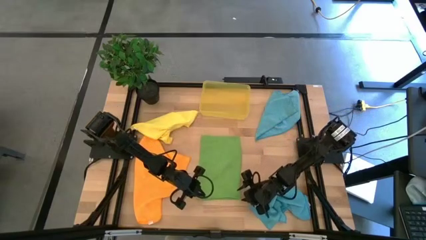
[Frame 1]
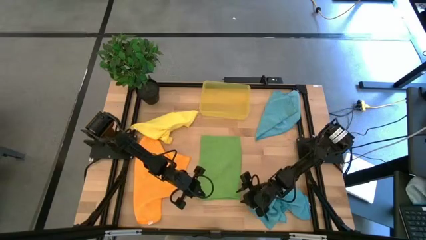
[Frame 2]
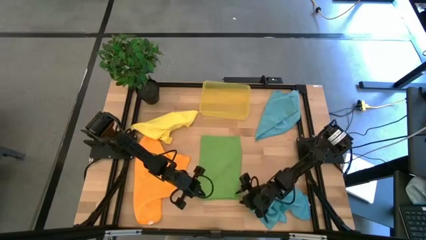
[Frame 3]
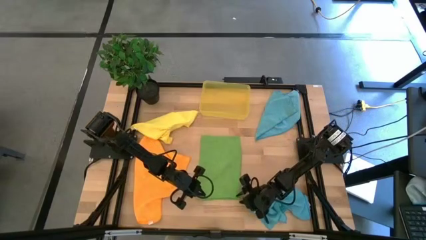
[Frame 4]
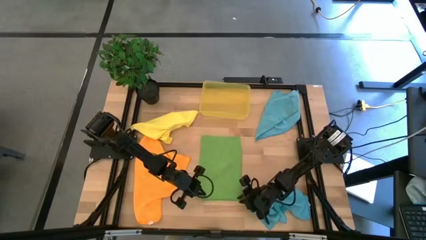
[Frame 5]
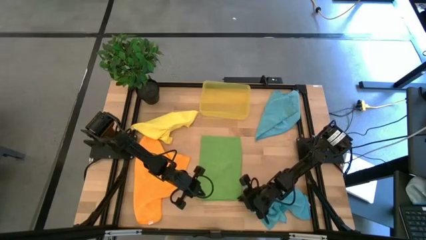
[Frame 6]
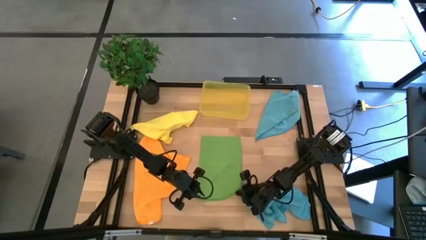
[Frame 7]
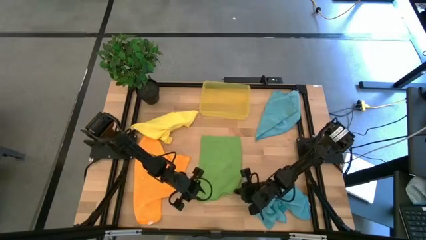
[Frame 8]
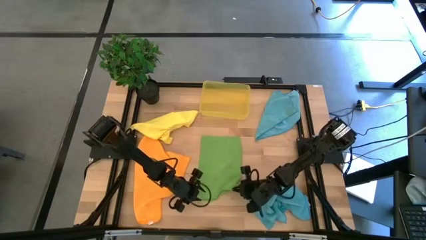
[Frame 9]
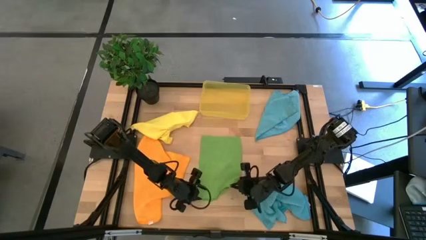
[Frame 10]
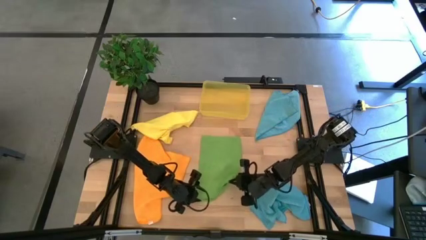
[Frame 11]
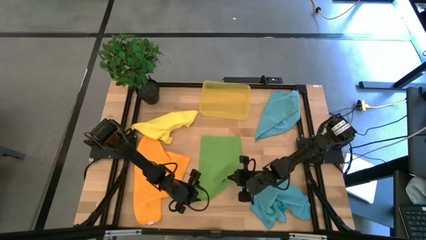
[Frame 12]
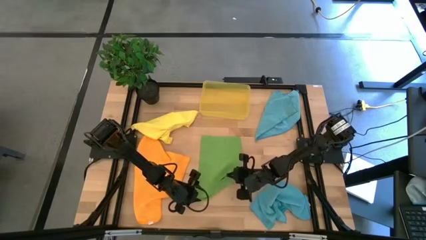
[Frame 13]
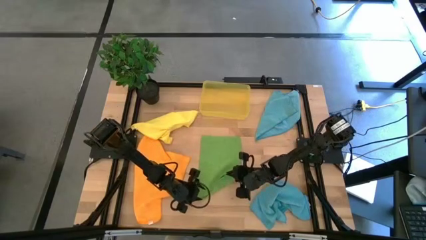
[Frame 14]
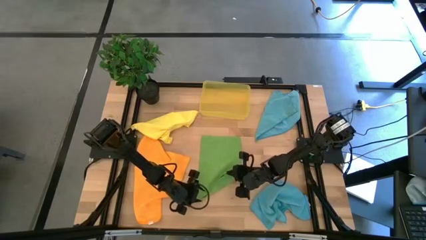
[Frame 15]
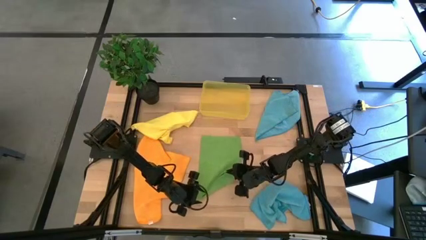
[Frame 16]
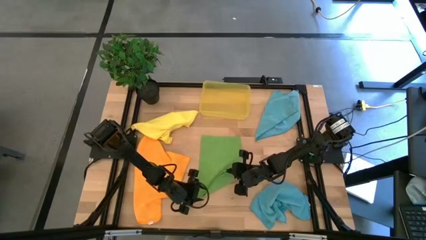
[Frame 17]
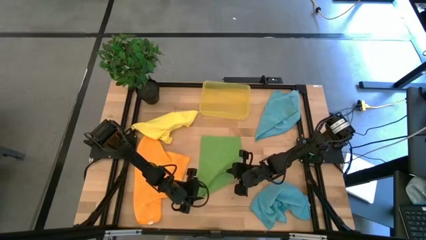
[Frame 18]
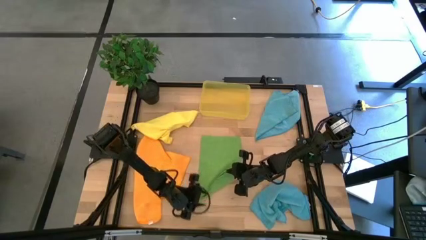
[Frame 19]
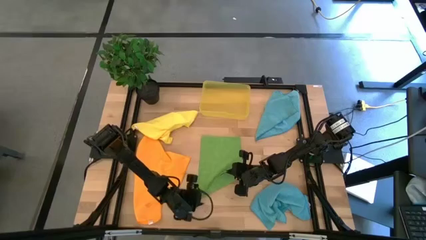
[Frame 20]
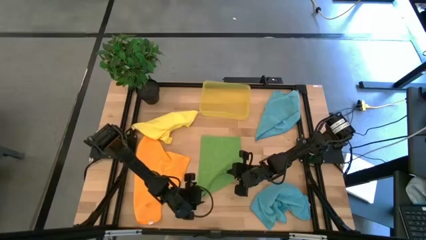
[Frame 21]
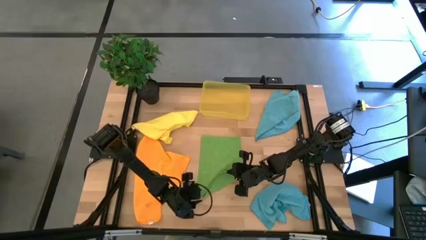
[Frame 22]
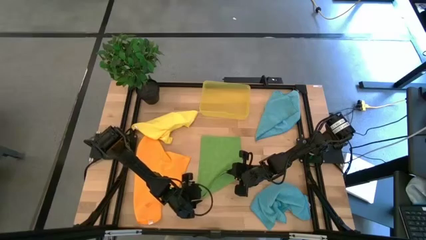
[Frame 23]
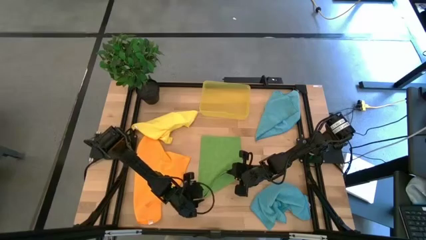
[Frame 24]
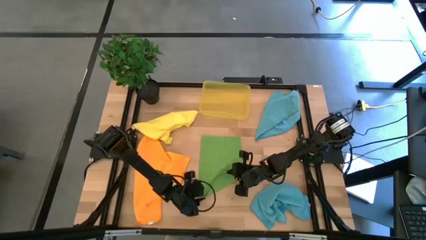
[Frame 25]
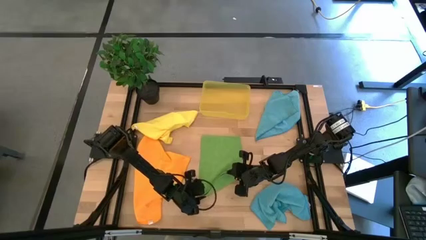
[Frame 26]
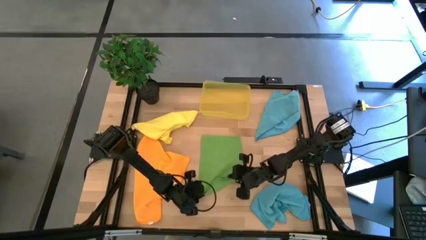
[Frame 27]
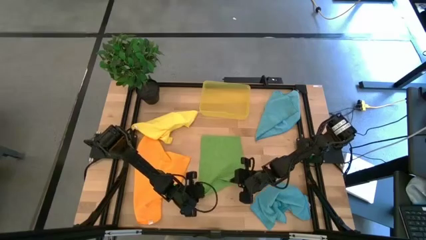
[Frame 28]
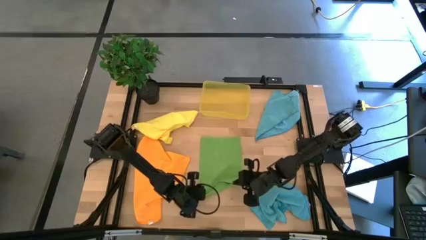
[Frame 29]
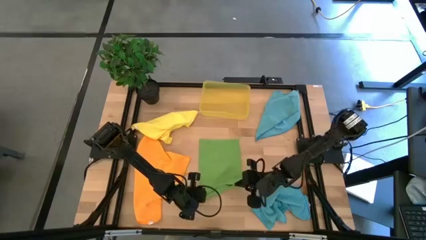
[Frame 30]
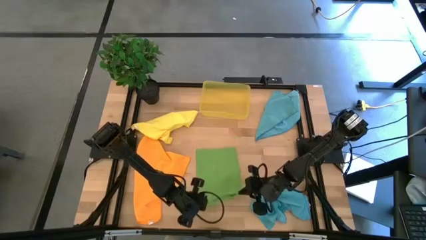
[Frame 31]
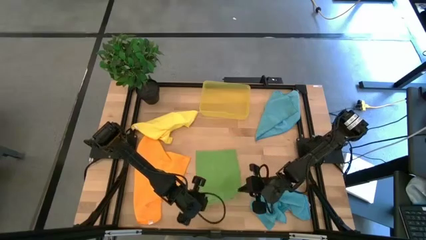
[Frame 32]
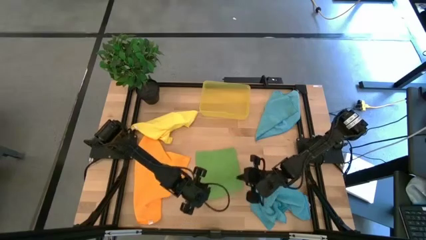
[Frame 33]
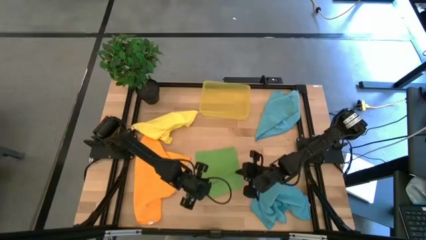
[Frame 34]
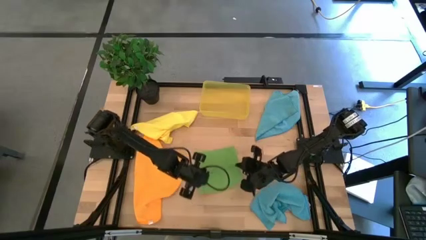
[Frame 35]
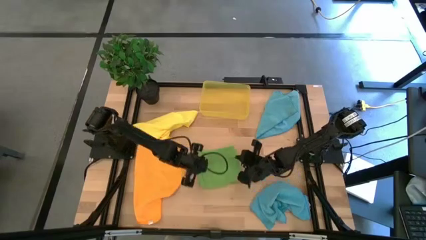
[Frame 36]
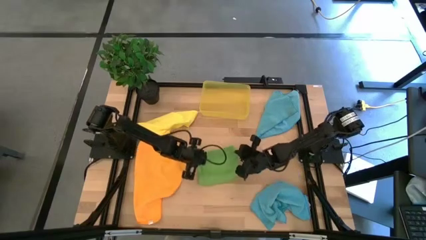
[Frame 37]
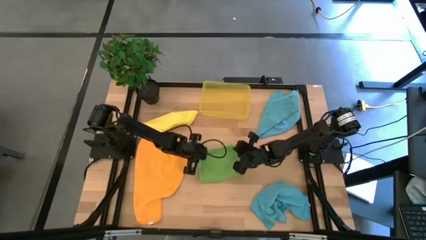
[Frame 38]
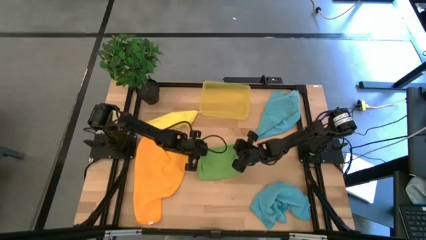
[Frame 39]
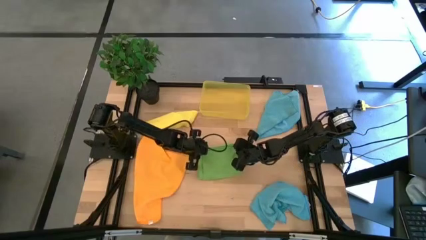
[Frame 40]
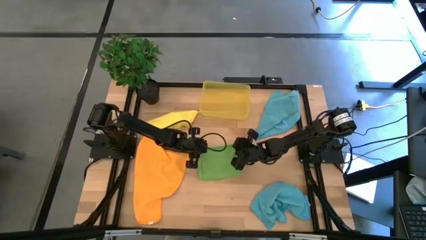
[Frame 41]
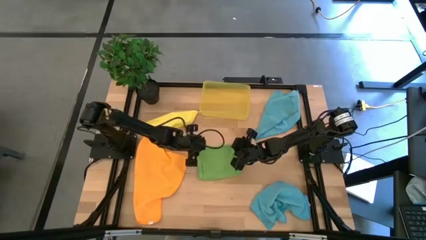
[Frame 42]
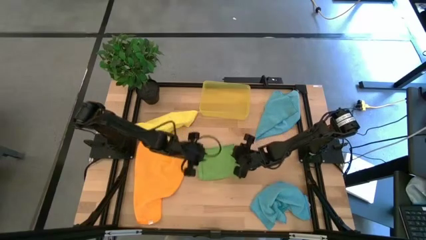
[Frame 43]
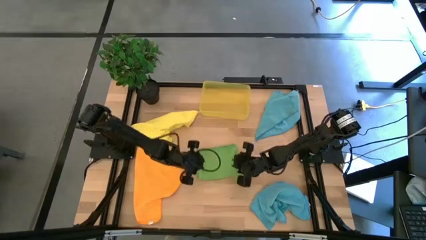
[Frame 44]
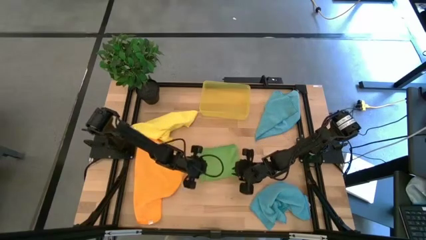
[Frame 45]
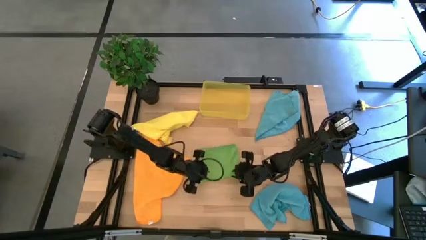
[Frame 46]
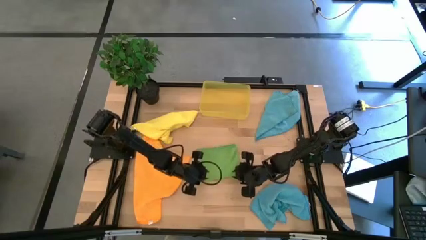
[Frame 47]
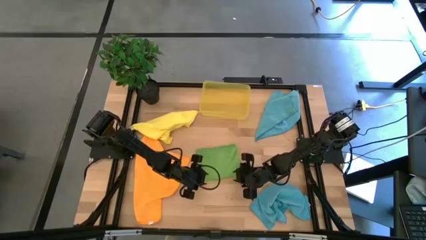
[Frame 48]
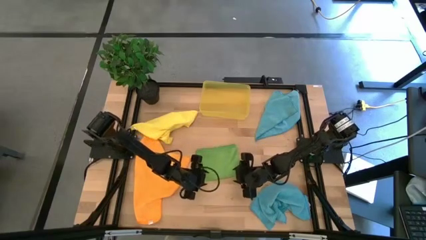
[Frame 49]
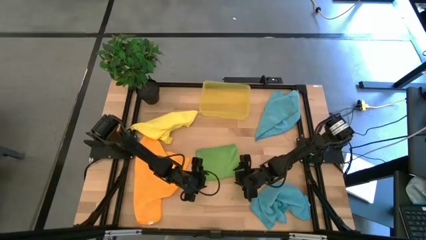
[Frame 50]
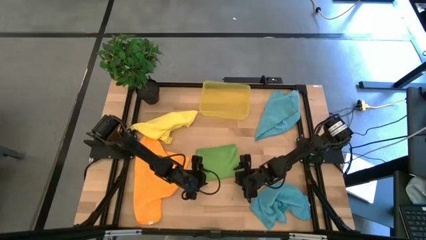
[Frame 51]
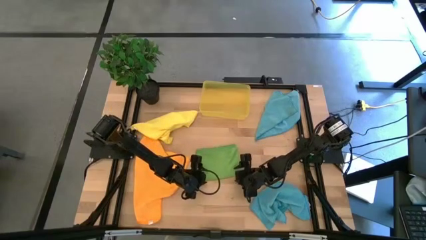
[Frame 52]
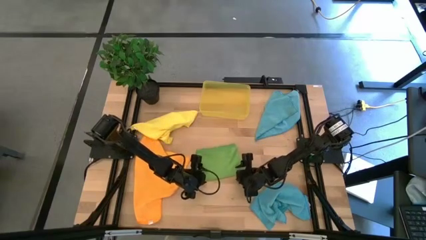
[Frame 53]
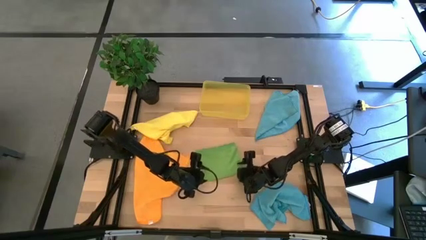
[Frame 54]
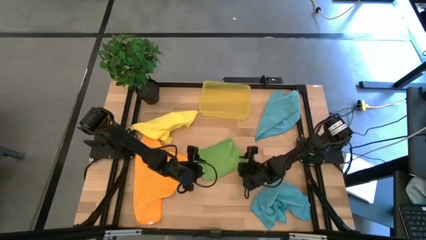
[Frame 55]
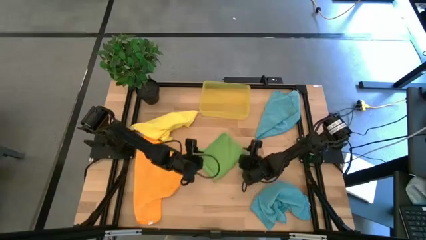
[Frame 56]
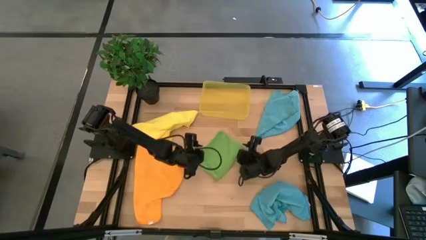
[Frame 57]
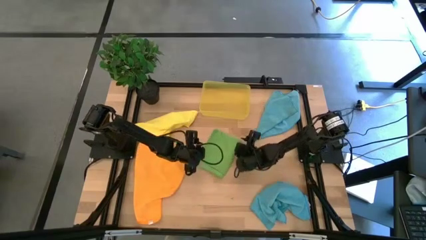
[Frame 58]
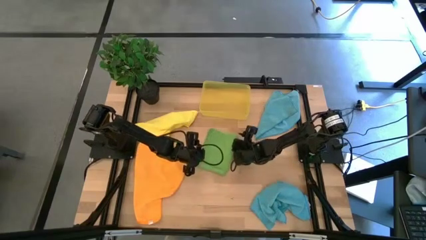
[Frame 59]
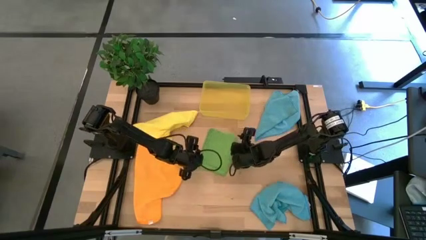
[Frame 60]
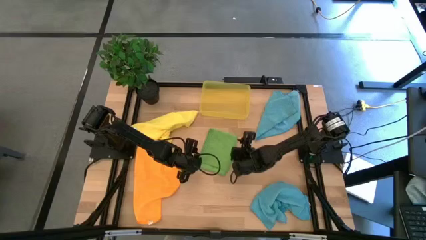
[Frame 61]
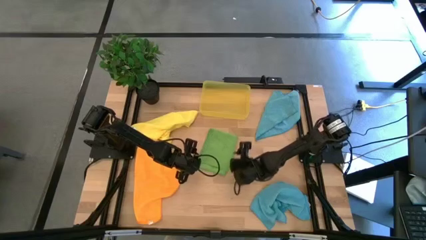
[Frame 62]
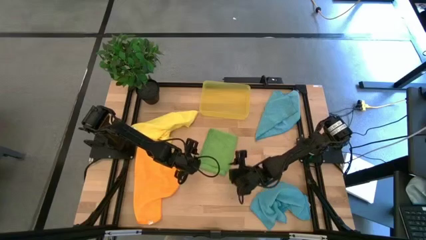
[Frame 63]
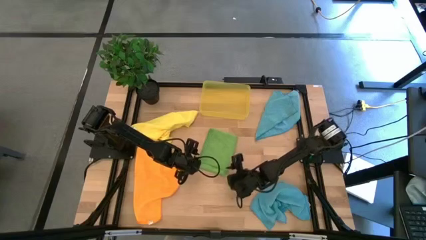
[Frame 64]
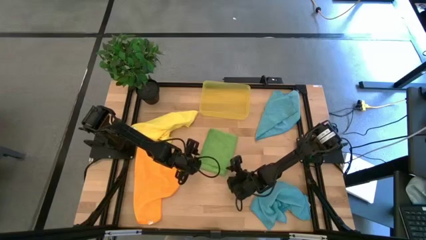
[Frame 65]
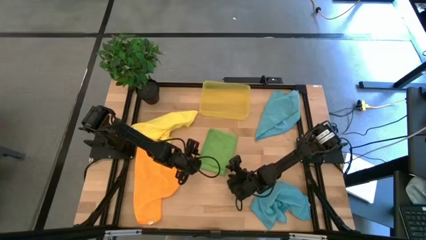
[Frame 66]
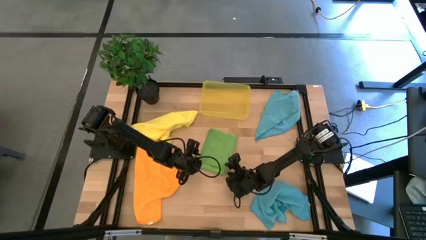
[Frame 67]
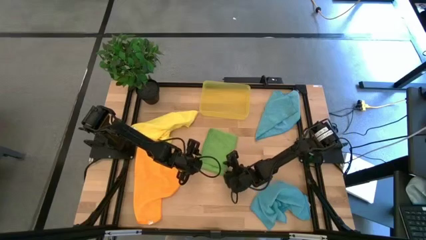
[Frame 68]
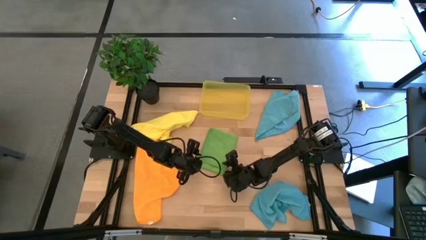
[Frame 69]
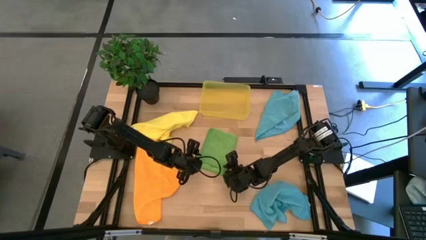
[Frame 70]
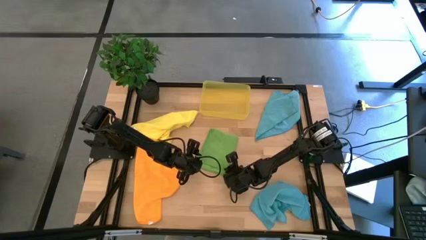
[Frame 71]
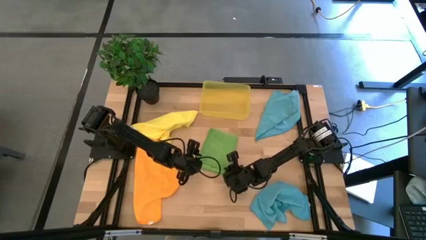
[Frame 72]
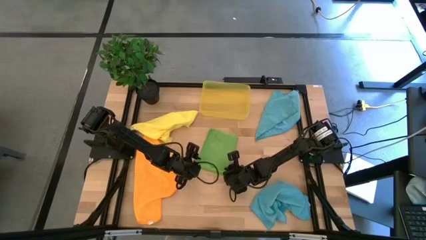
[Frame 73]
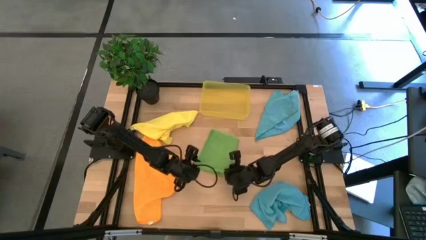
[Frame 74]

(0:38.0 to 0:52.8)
Task: Fold microfiber towels
Fold the green microfiber cloth
